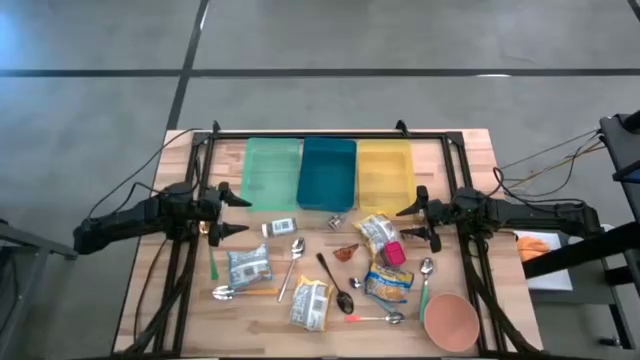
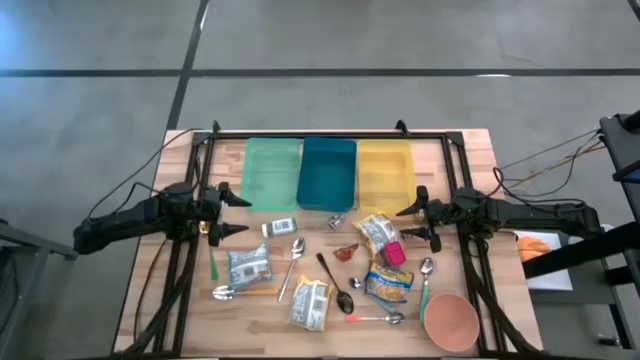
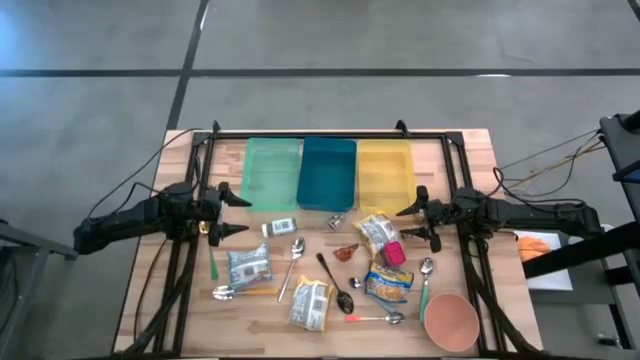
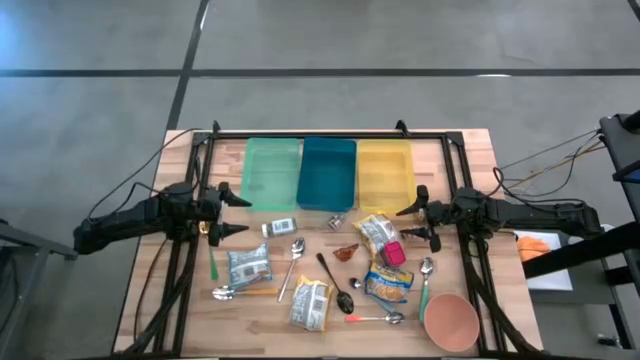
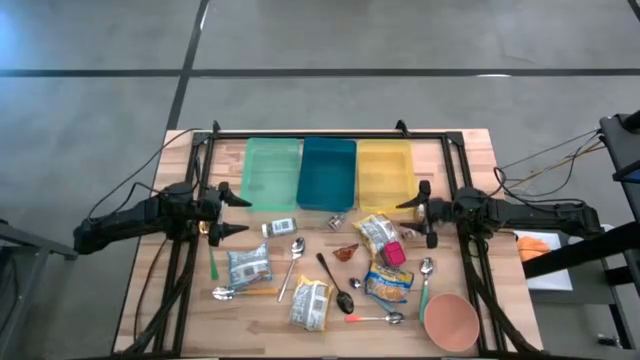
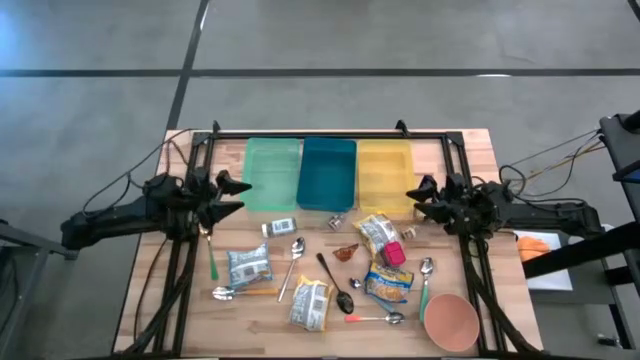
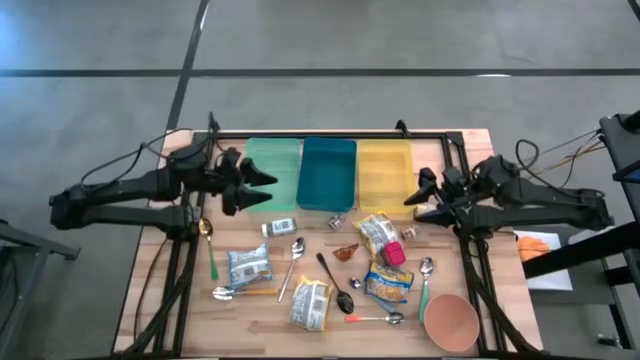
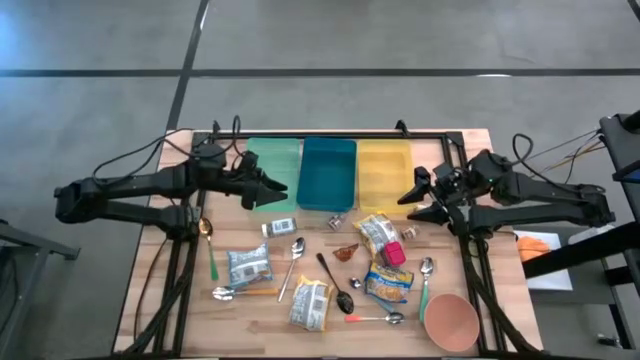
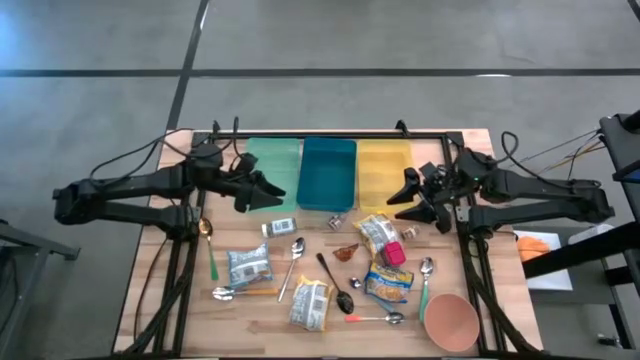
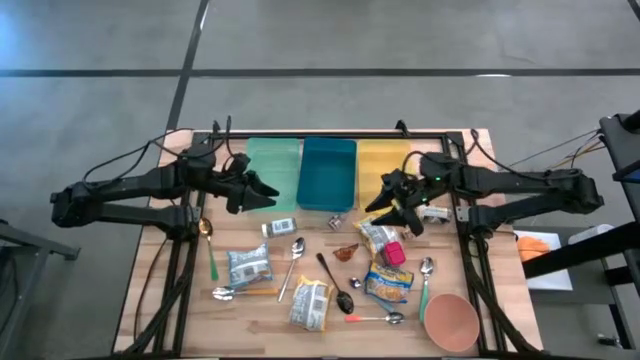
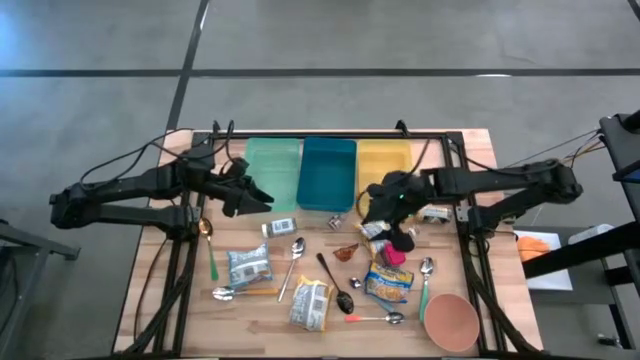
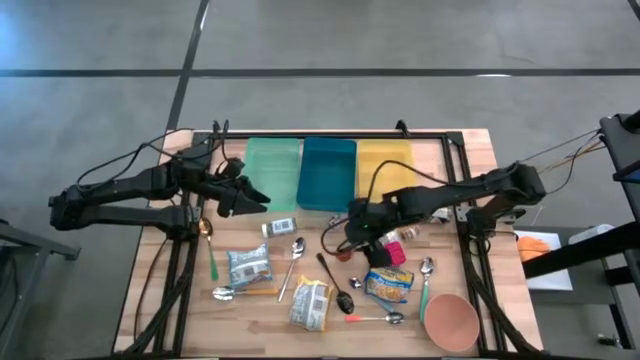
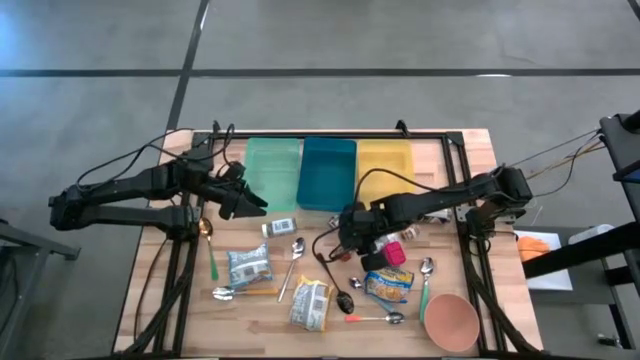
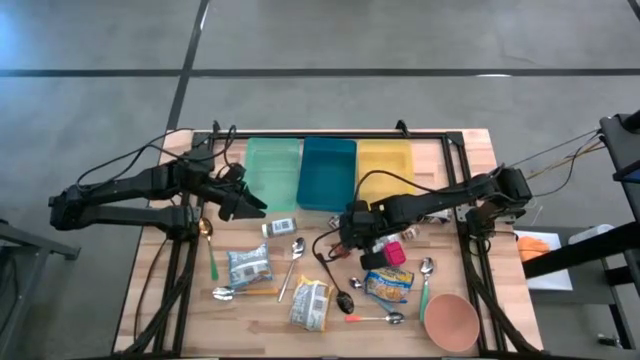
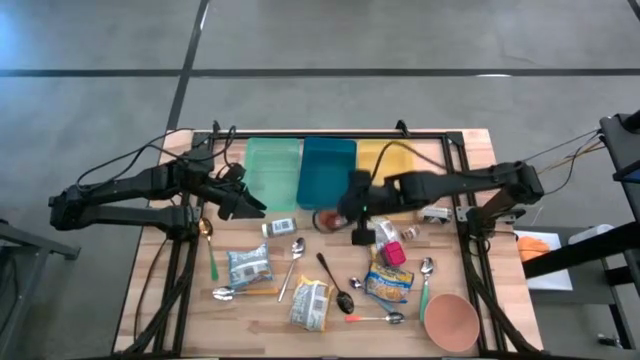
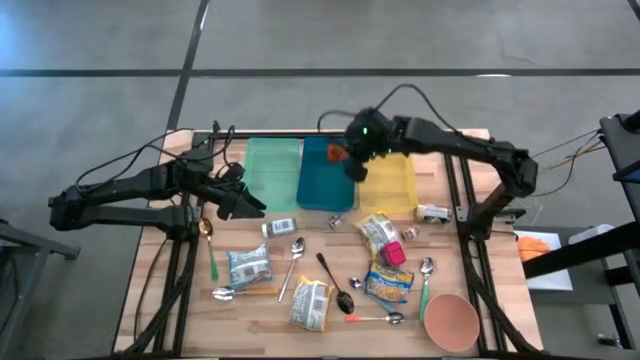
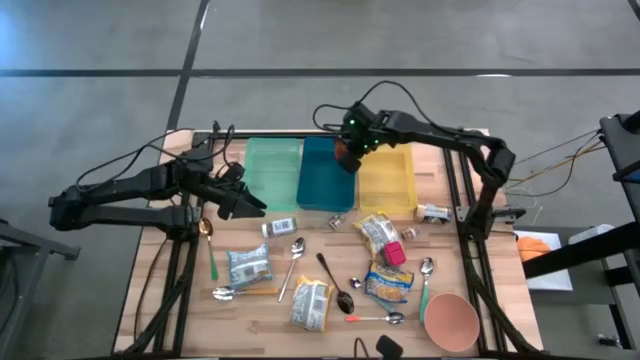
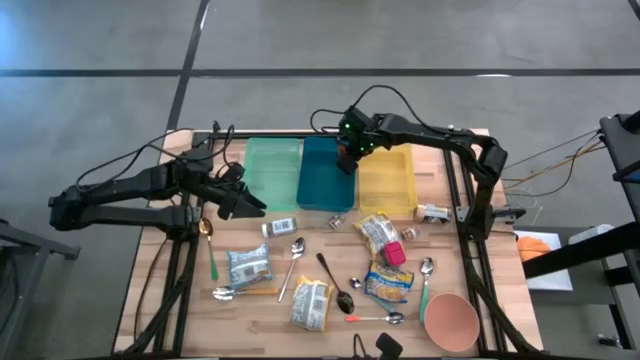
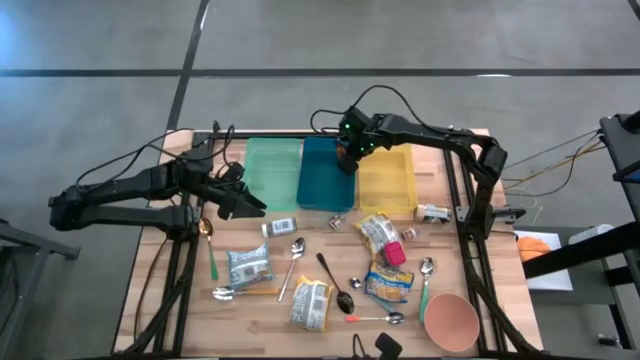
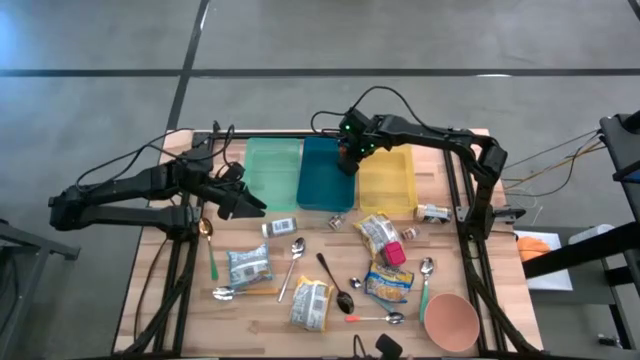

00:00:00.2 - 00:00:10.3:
Put the orange seasoning pack into the blue bin

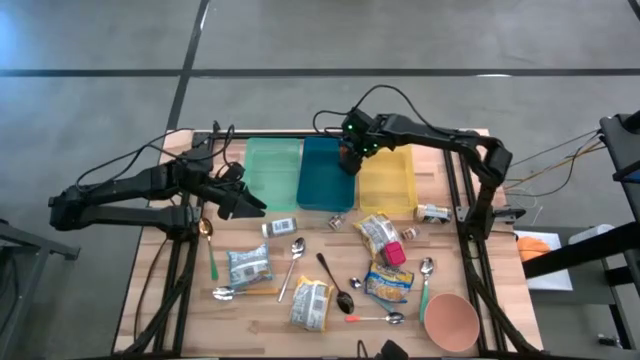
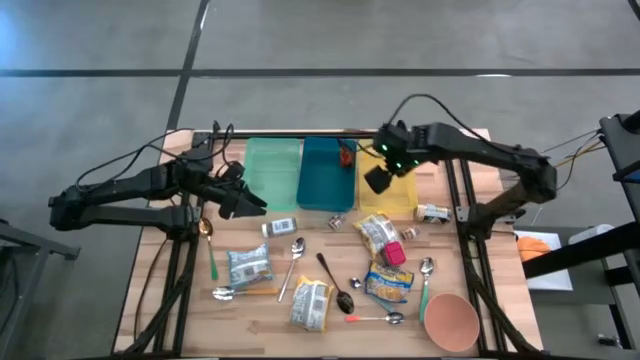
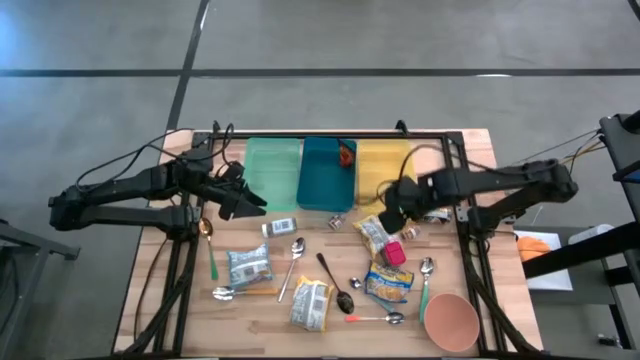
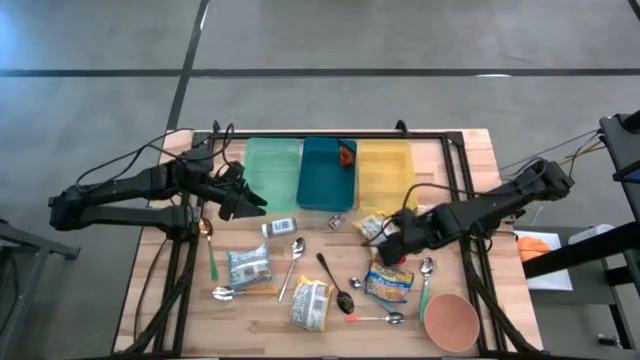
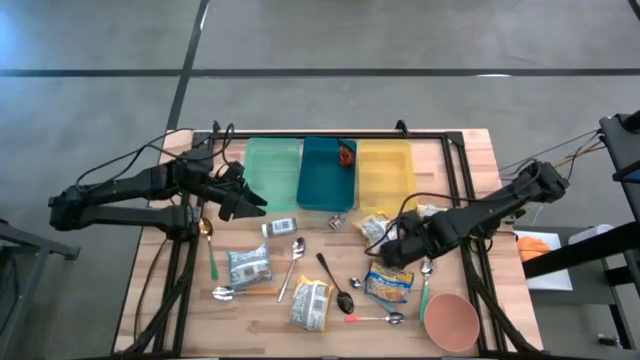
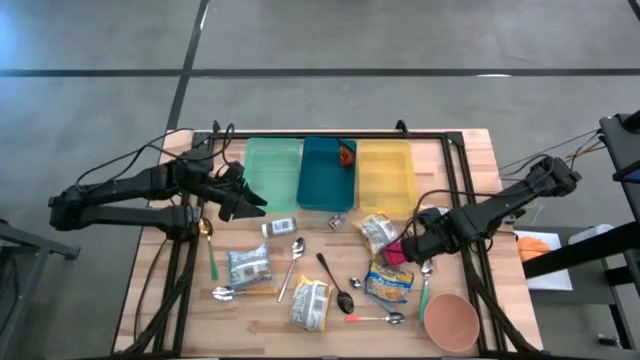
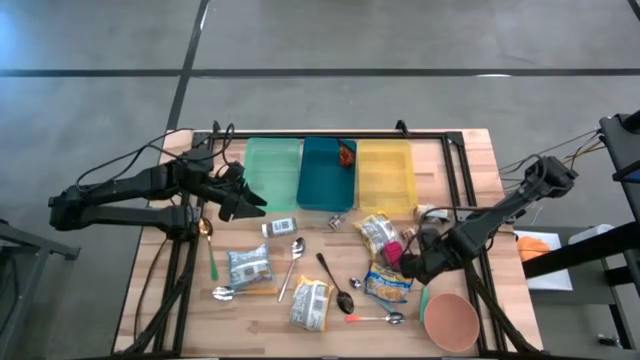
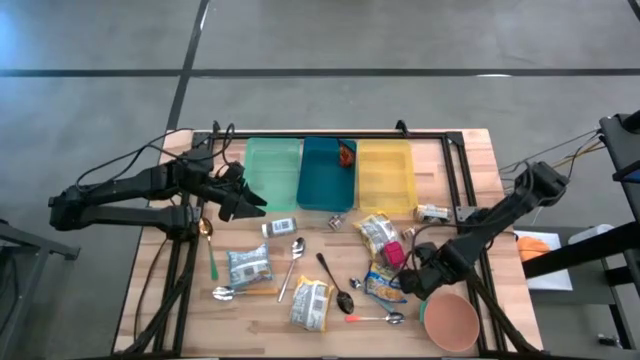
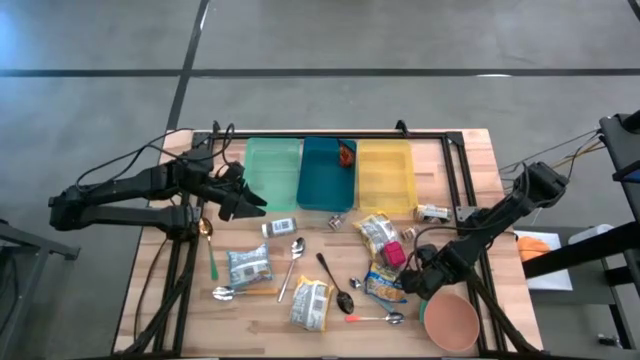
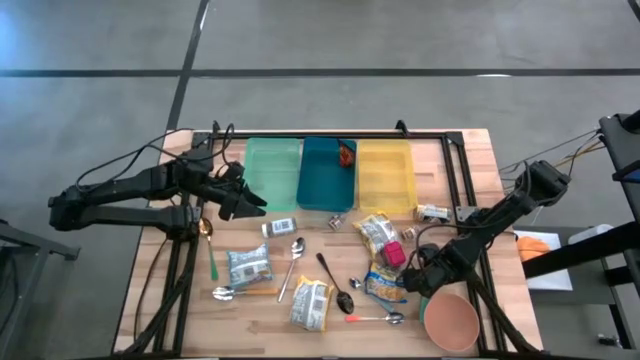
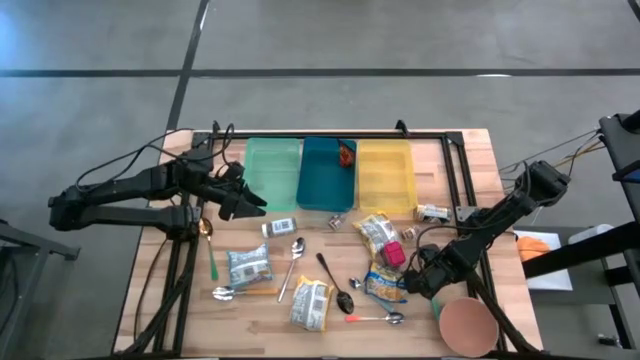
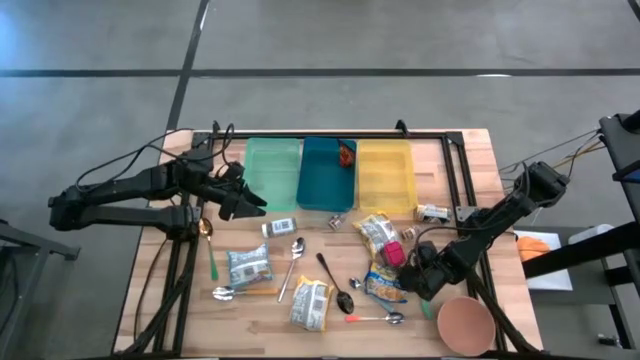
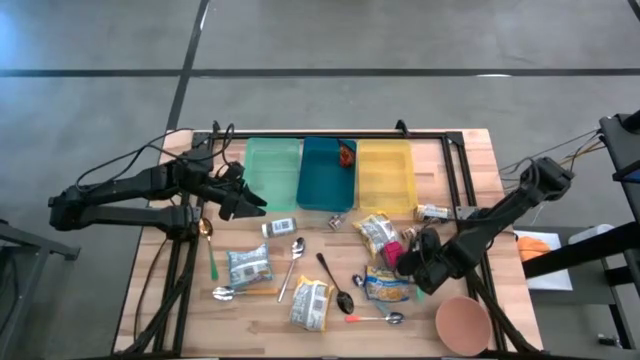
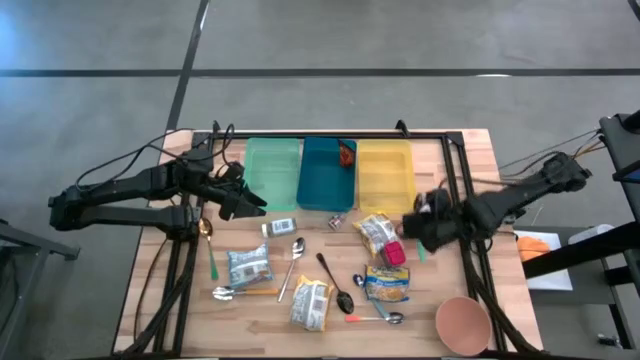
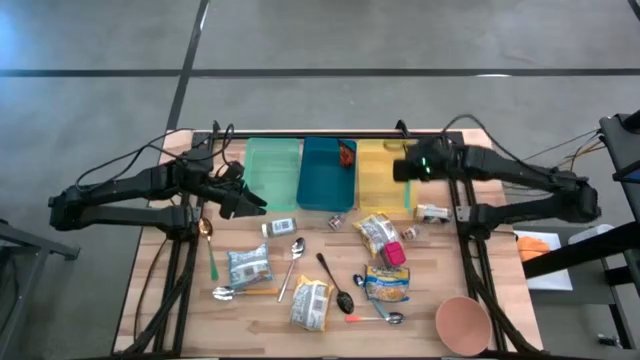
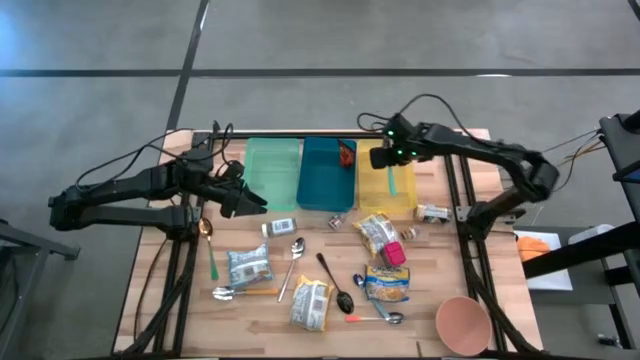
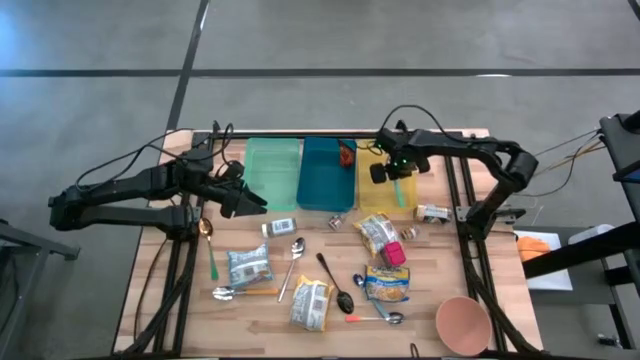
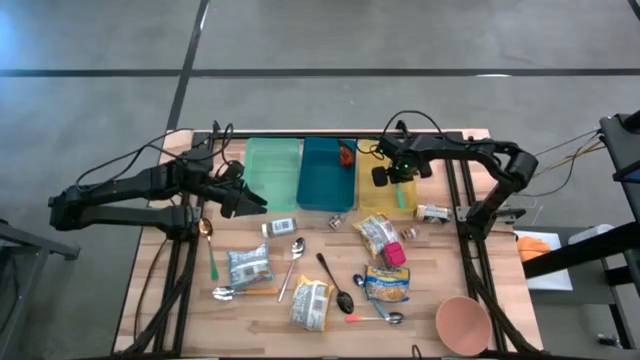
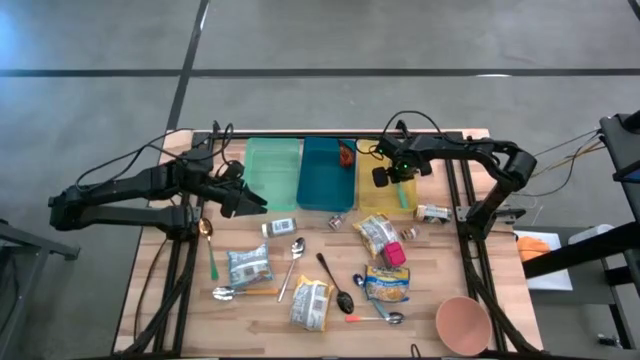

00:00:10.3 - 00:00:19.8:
Put the light green spoon into the yellow bin
